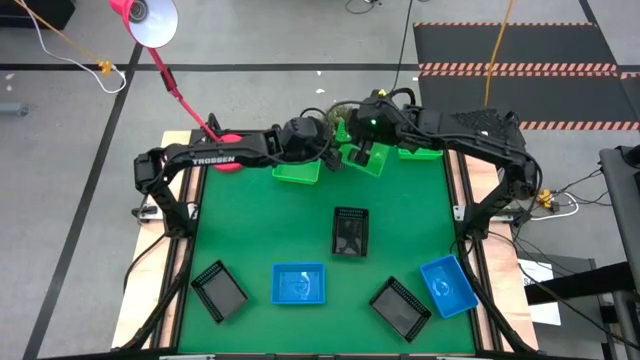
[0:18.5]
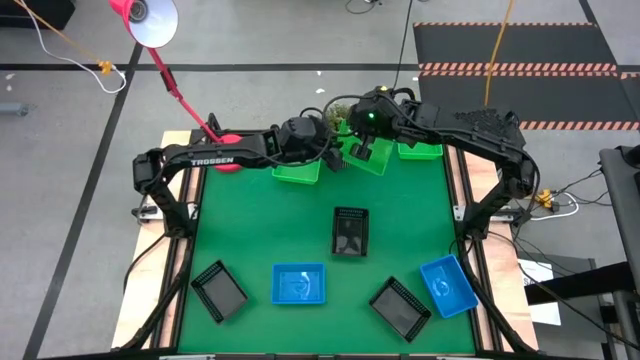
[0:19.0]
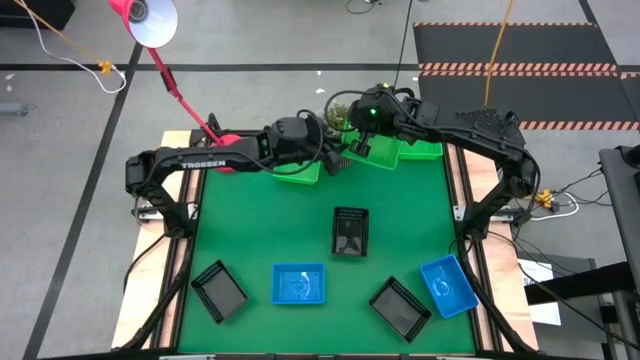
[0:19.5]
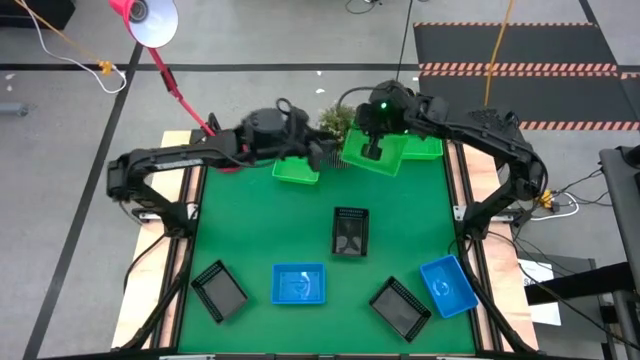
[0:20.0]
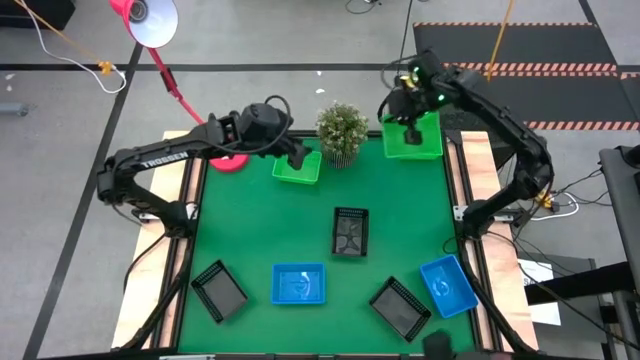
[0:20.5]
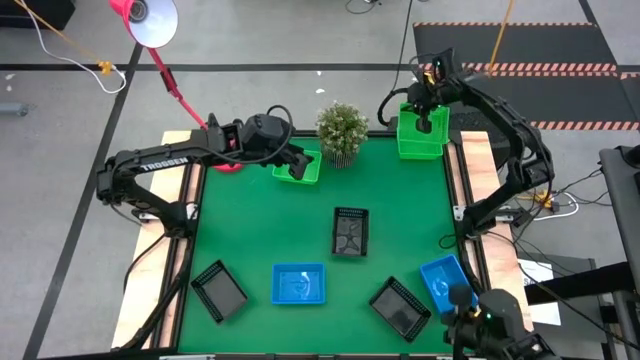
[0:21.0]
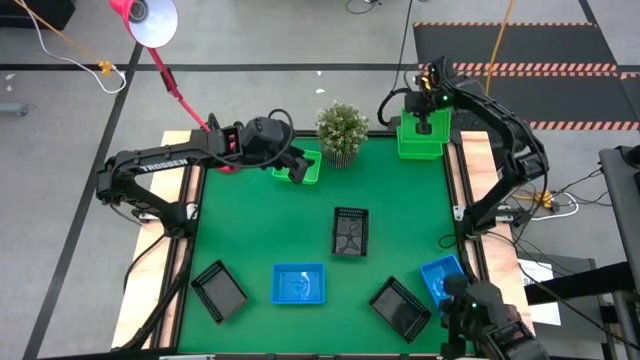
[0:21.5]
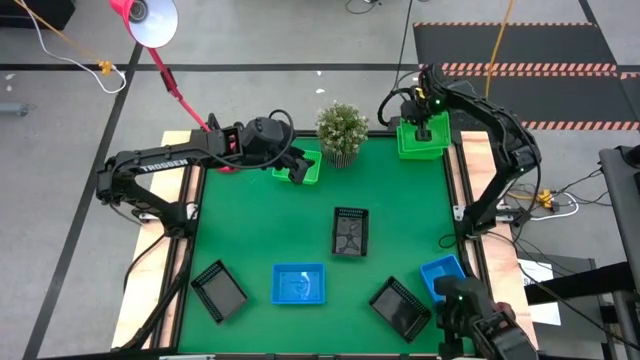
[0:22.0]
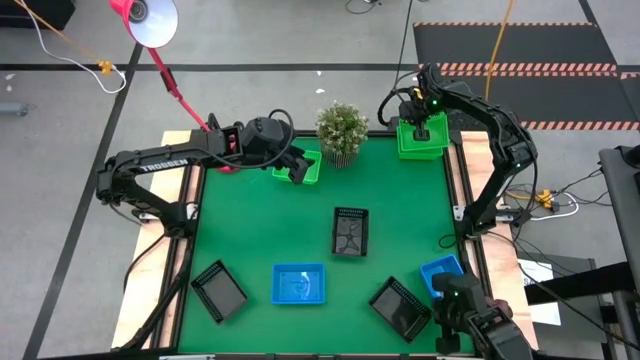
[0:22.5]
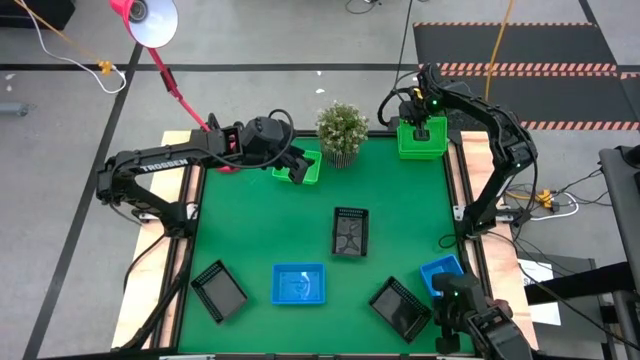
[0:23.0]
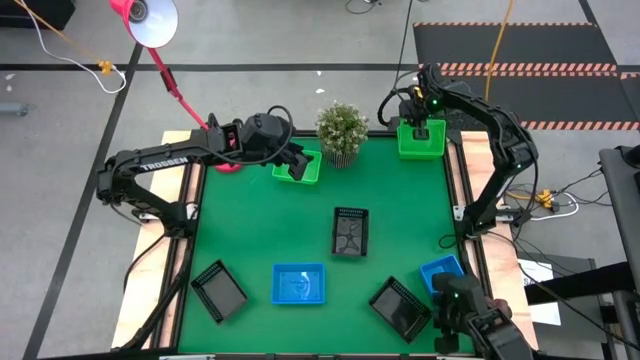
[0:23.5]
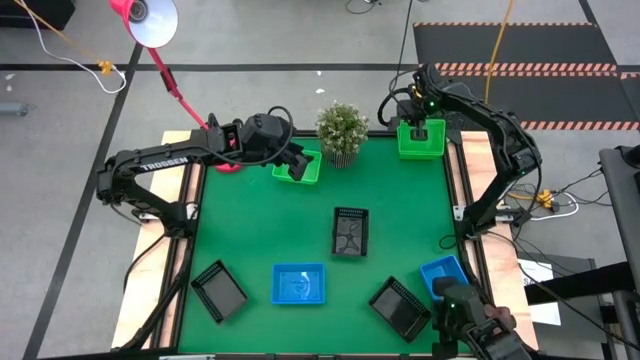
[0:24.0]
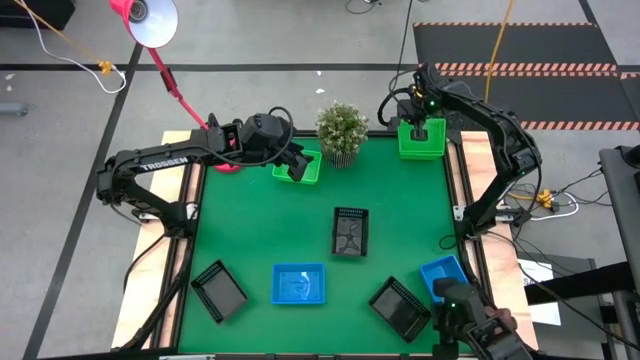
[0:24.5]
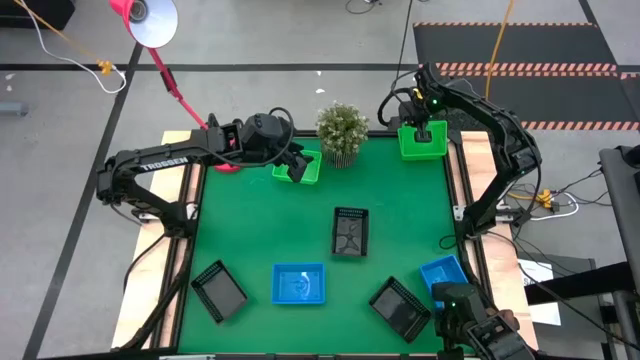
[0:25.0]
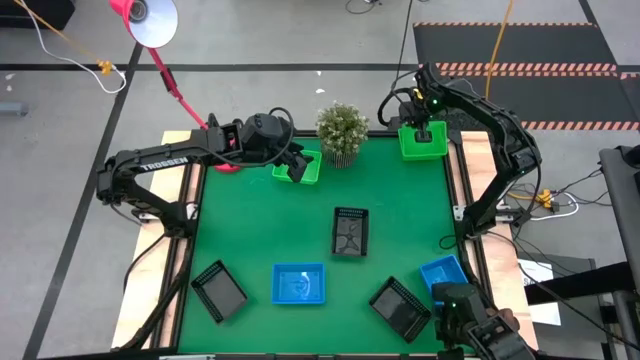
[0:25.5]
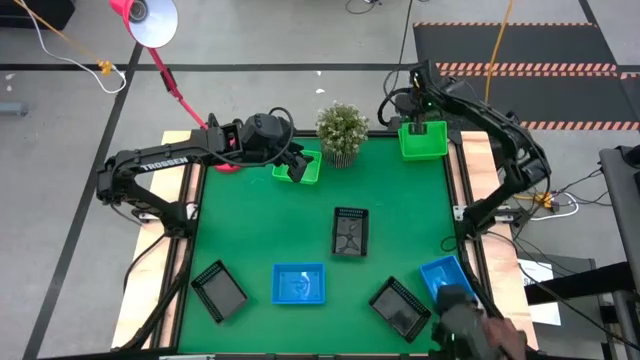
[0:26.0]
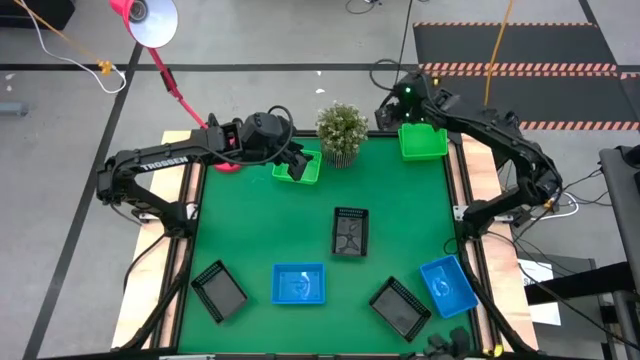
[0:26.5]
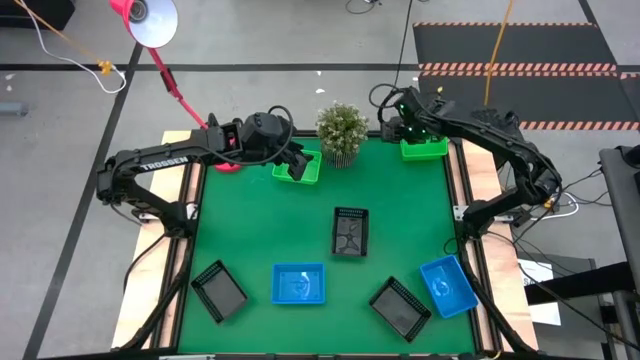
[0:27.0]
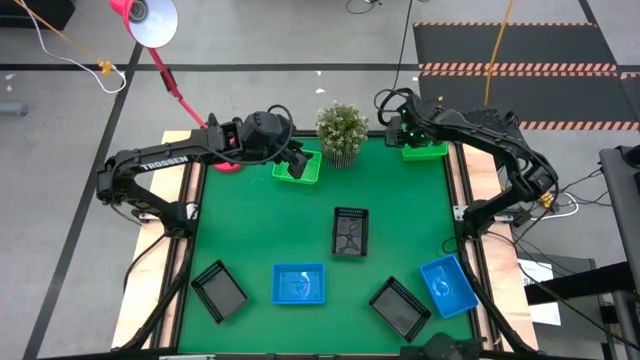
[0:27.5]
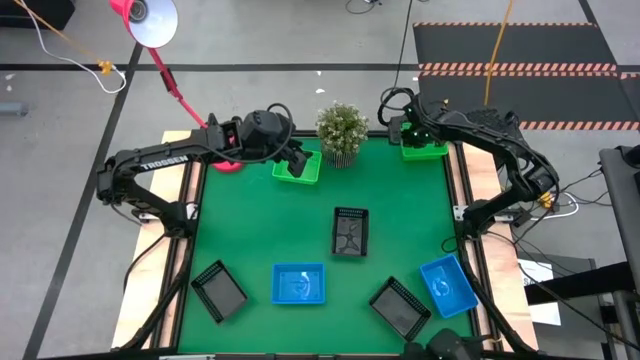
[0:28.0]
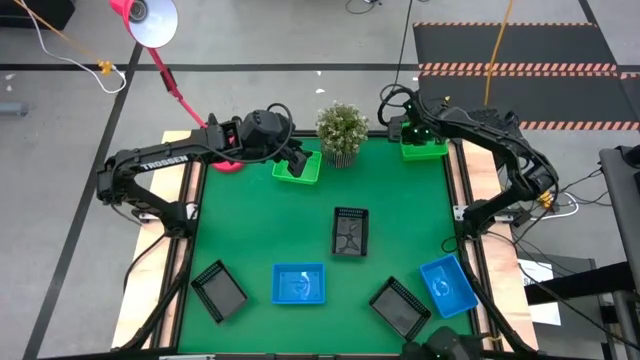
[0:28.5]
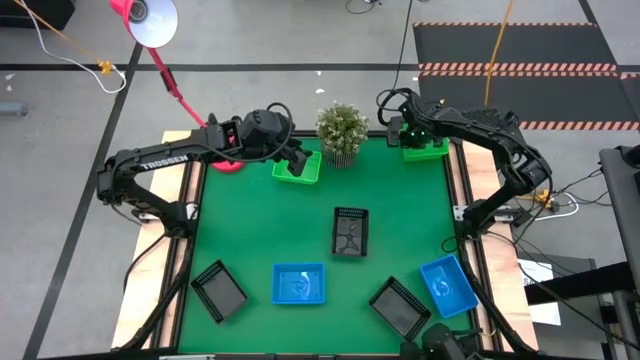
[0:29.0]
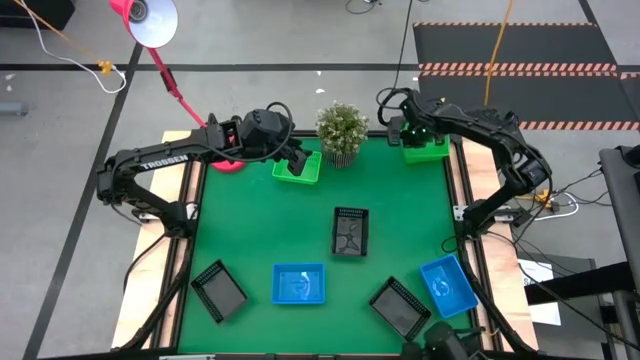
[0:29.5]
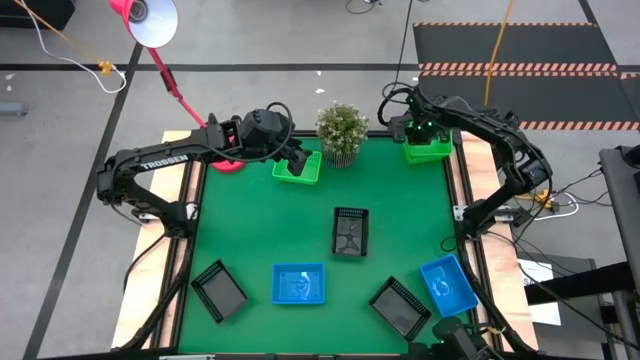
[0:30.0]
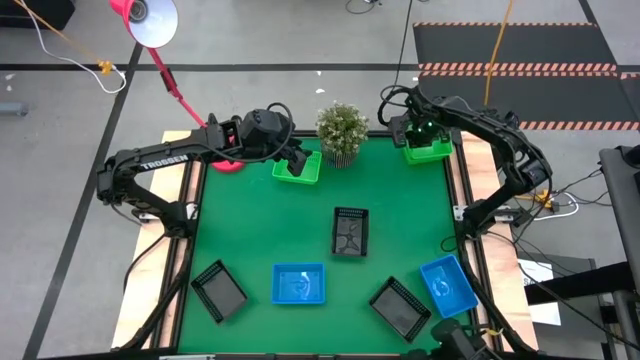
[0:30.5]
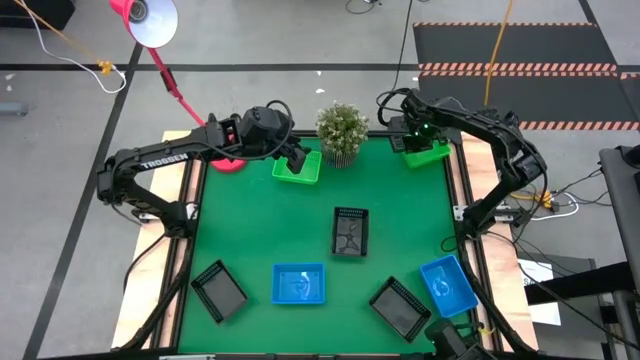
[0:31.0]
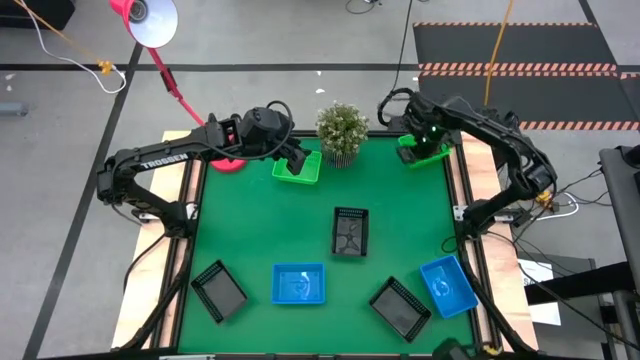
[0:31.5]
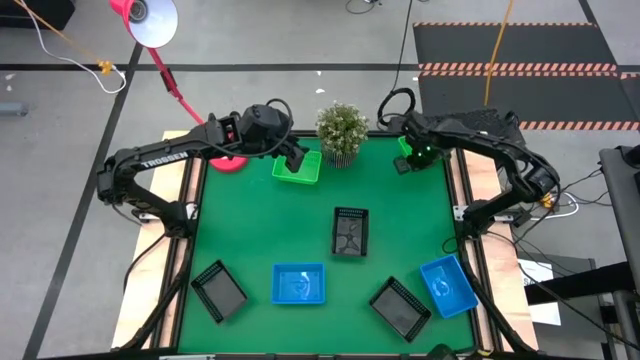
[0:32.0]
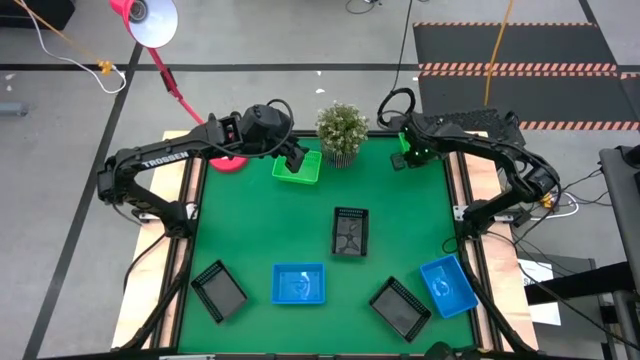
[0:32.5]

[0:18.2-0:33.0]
Stack the bottom left green bin on the top green bin

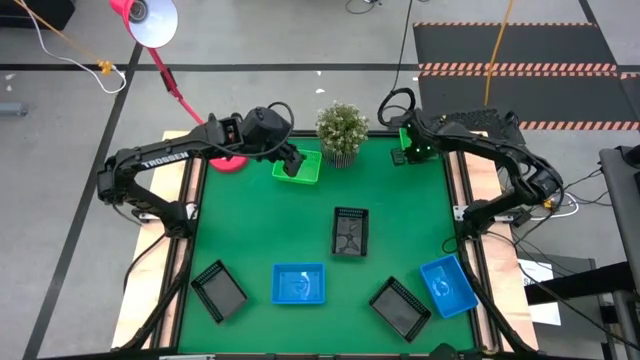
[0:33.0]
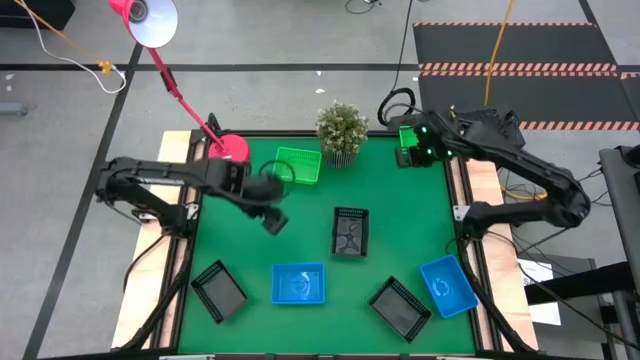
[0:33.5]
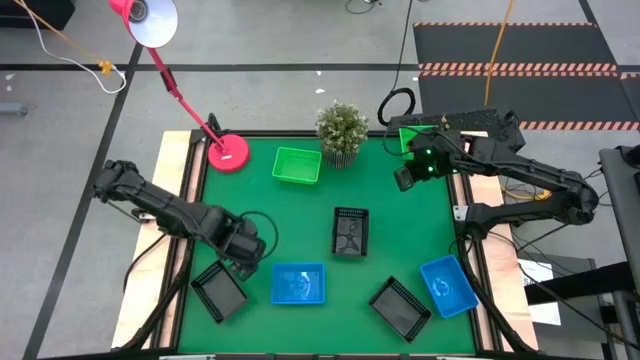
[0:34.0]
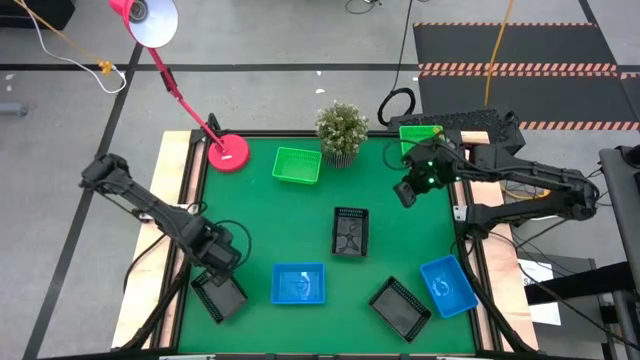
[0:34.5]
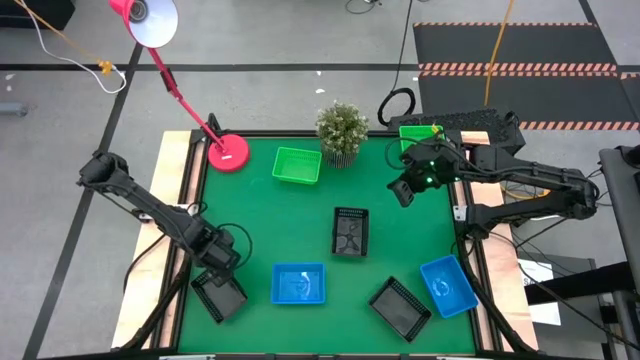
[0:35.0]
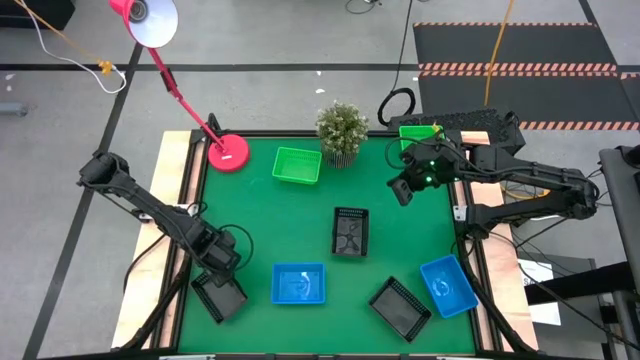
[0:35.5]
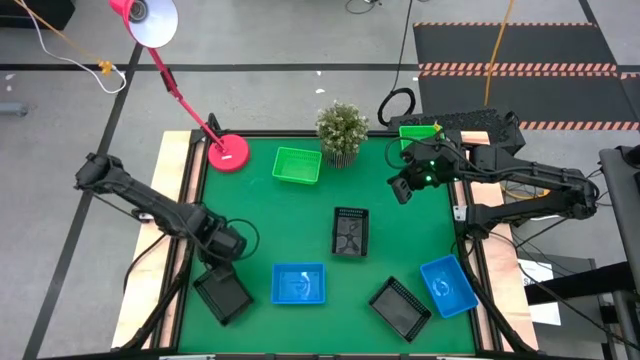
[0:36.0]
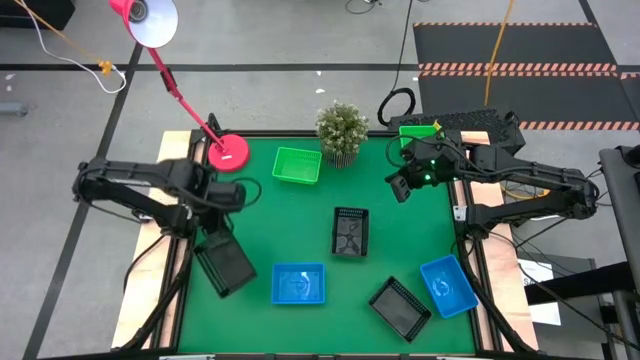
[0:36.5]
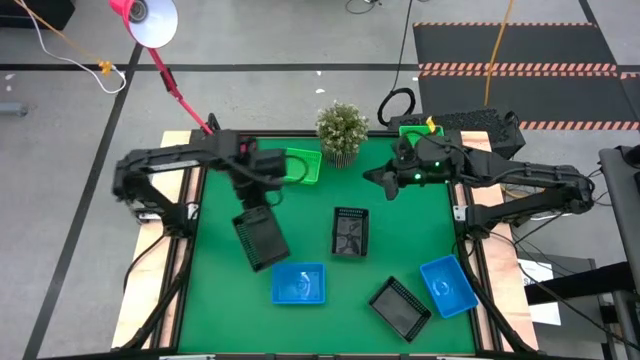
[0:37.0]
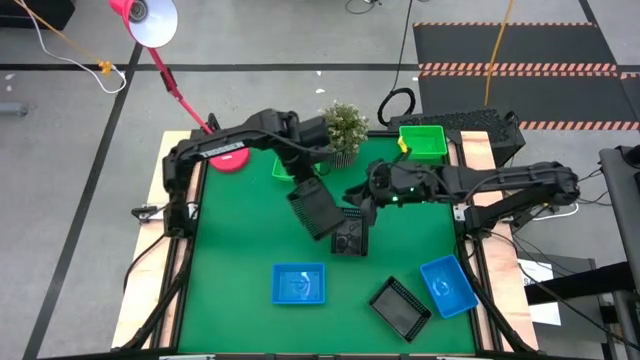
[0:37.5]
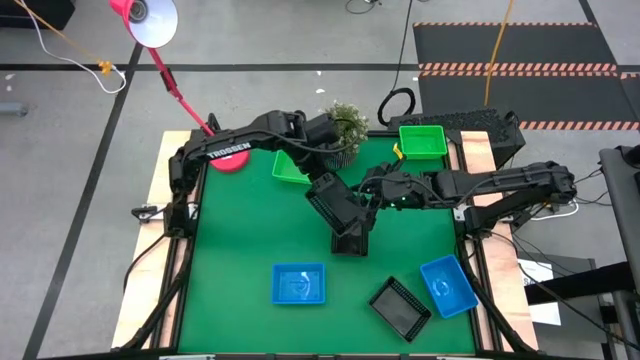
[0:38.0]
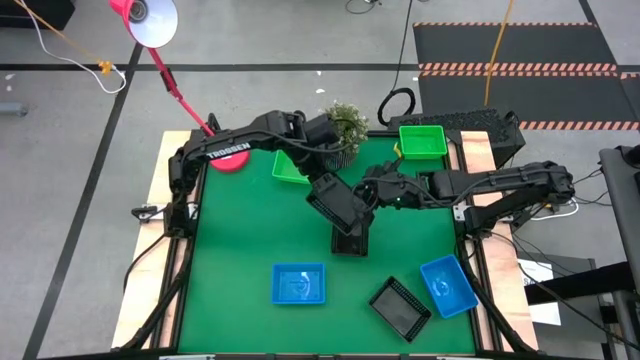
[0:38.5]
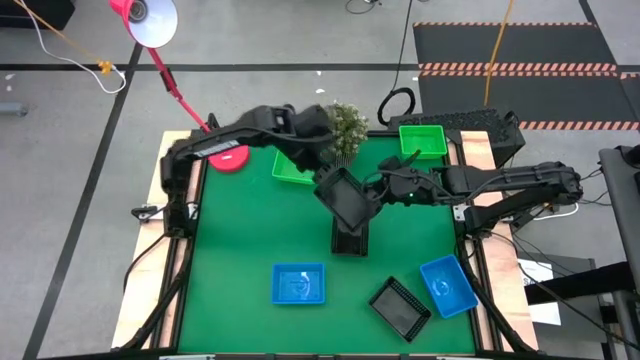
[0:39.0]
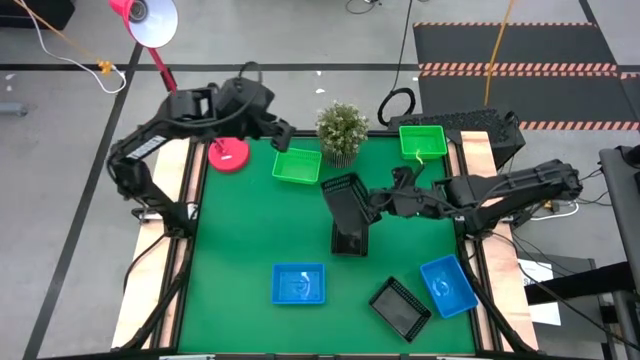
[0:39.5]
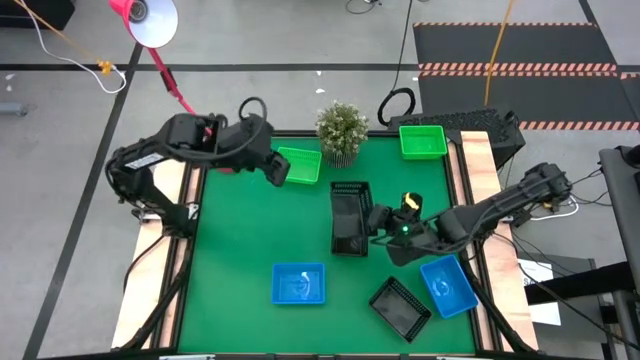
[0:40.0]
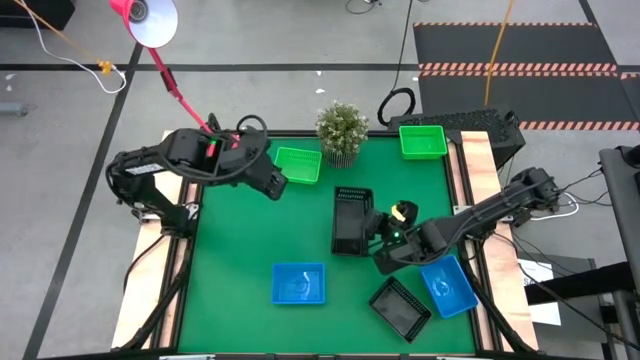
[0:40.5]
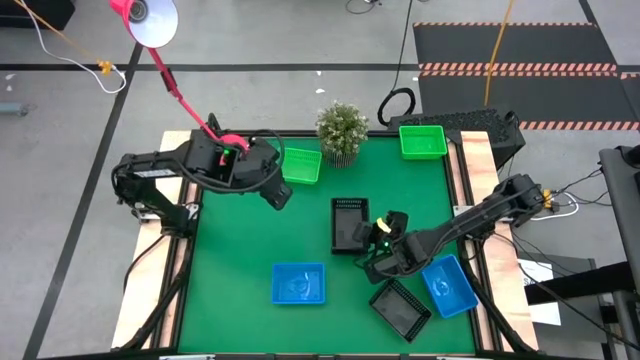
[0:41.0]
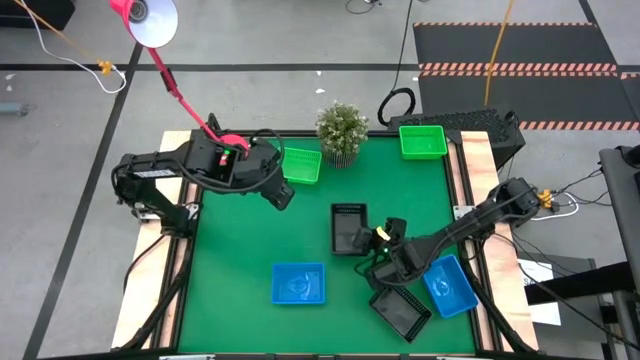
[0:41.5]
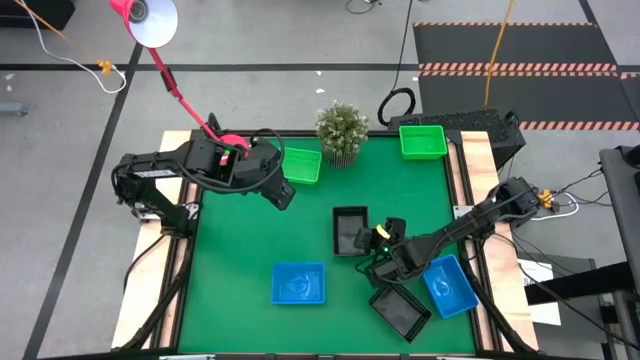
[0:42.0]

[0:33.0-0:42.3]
Stack the bottom left black bin on the top black bin
